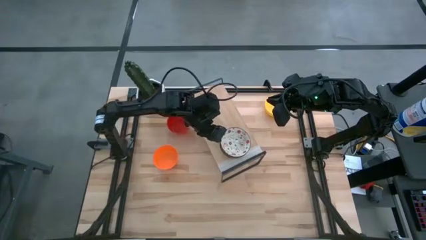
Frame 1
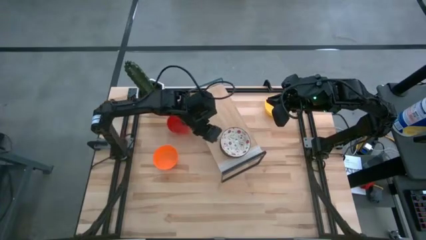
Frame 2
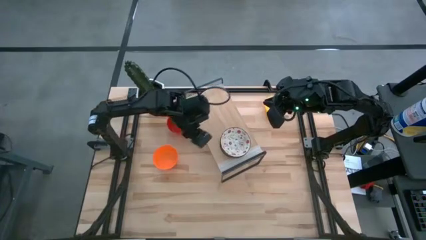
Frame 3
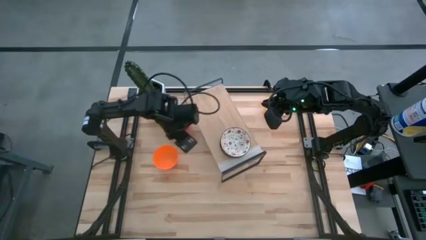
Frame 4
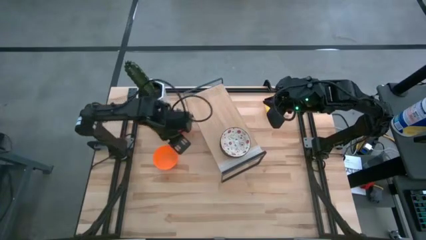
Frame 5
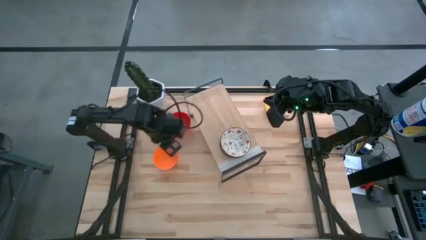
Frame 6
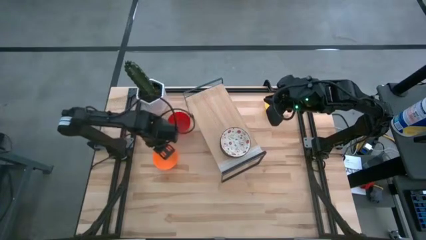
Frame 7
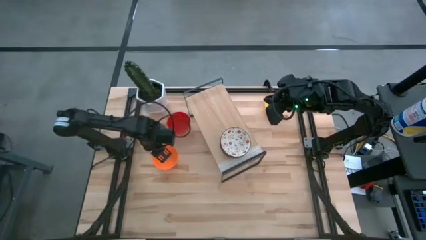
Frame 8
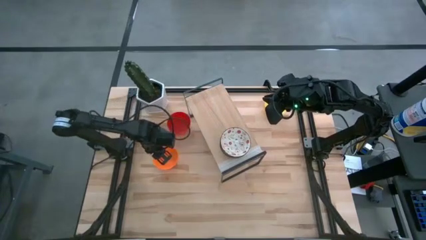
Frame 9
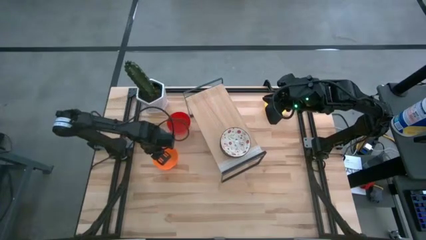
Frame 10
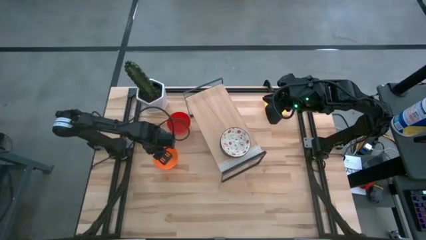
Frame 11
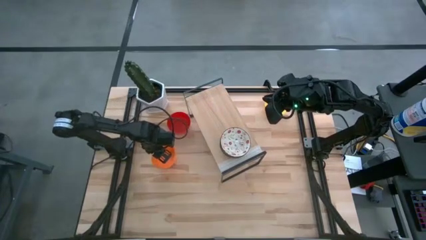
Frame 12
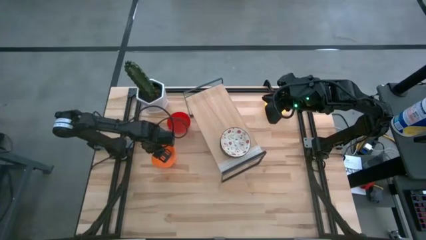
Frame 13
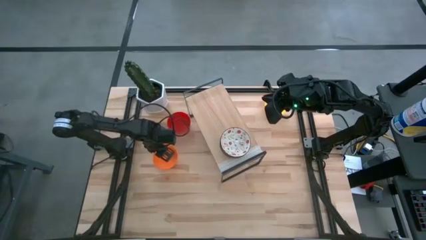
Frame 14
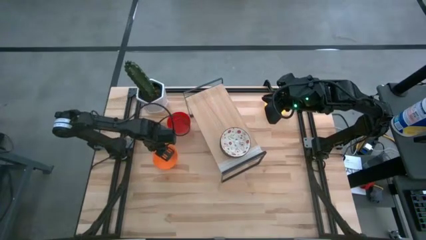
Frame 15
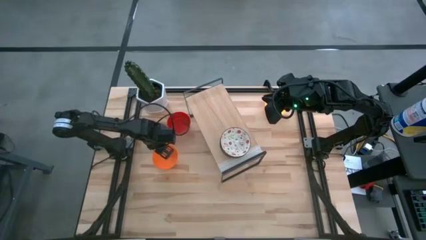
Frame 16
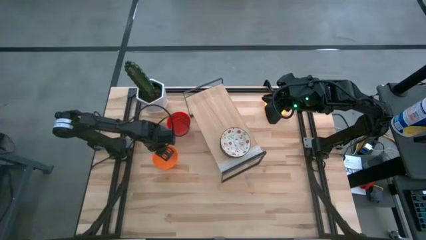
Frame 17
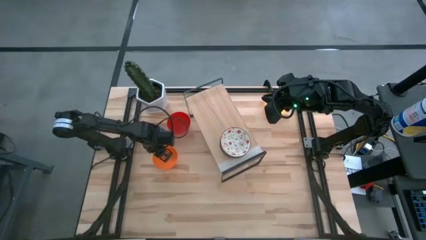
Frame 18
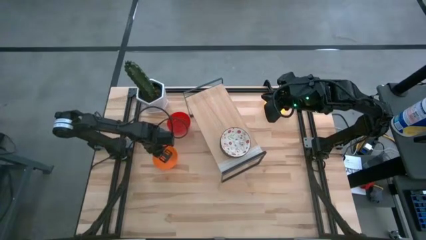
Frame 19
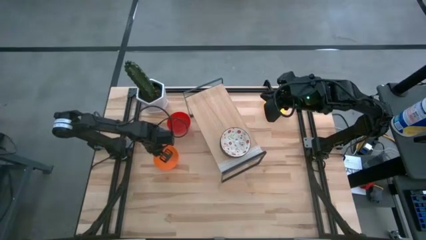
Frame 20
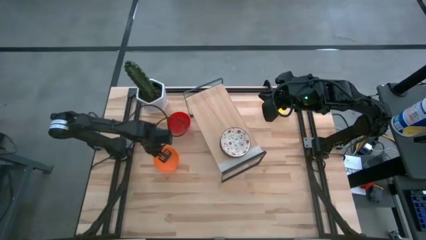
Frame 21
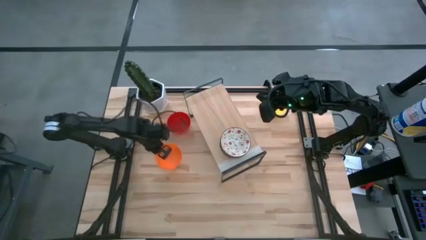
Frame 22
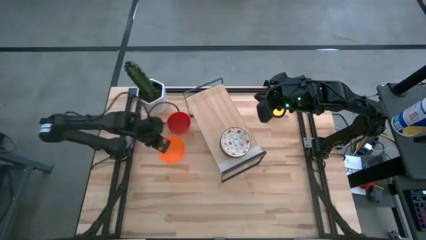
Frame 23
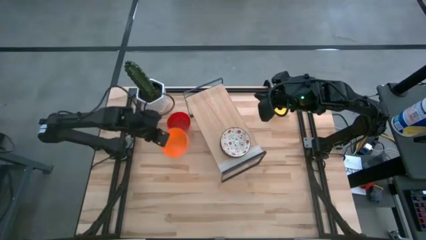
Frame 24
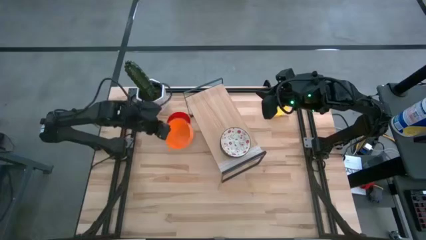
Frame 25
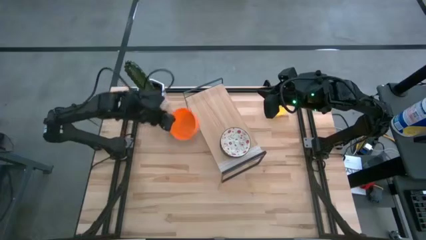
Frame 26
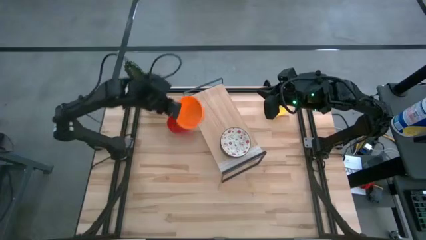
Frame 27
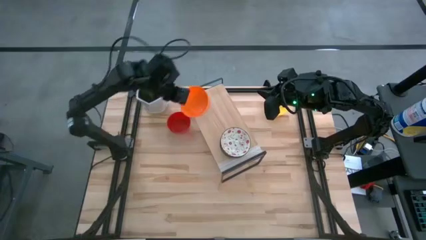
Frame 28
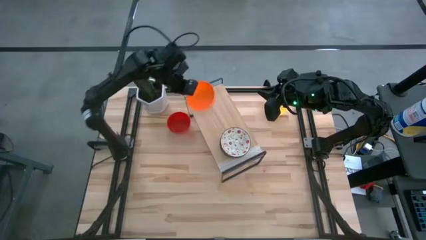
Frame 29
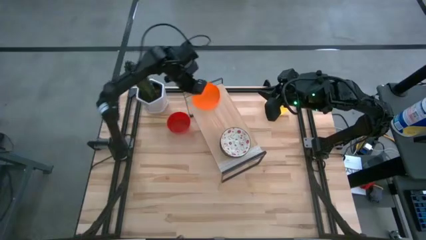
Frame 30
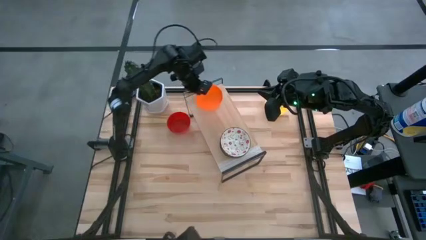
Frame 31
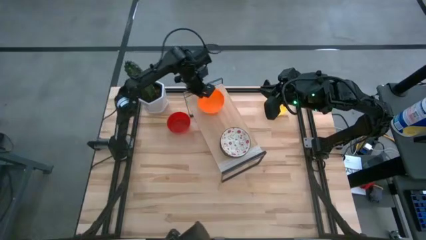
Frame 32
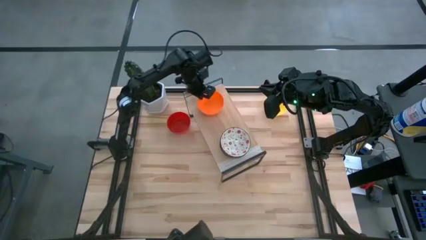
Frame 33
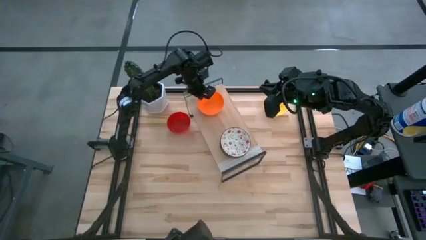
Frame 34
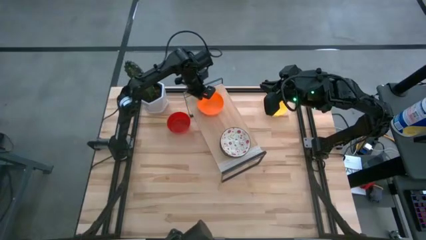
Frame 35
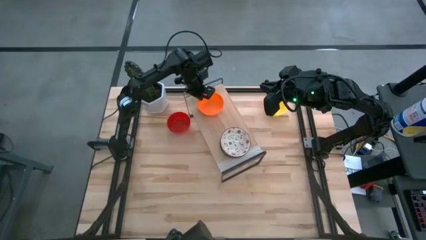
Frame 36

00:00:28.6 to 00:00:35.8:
Task: Pick & Place Mini bowls
Put the orange bin on the shelf

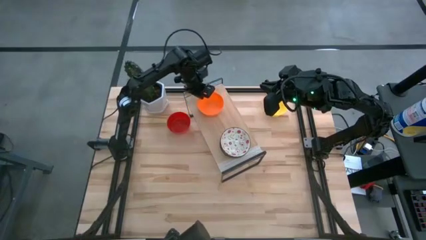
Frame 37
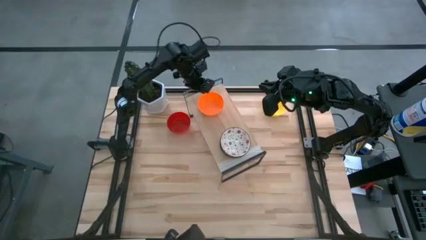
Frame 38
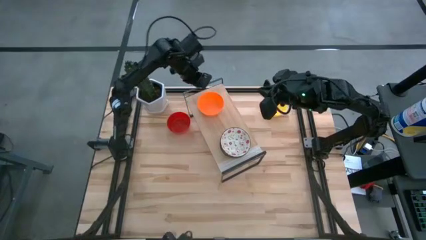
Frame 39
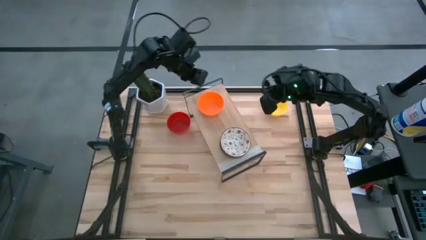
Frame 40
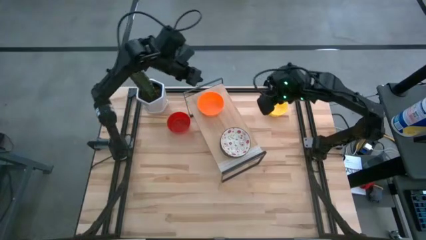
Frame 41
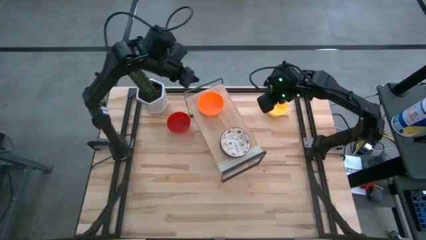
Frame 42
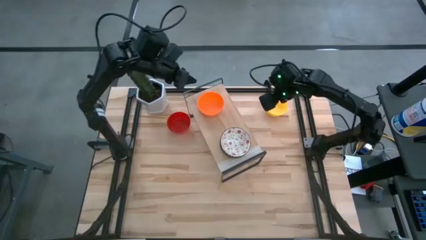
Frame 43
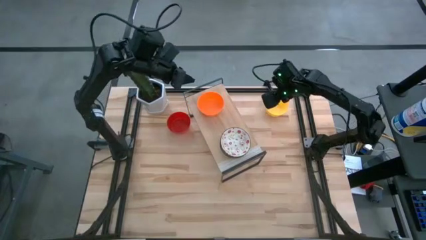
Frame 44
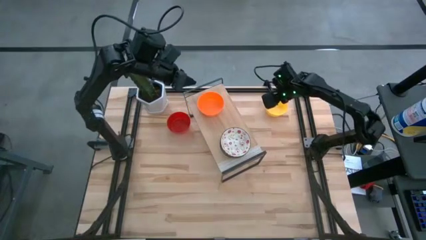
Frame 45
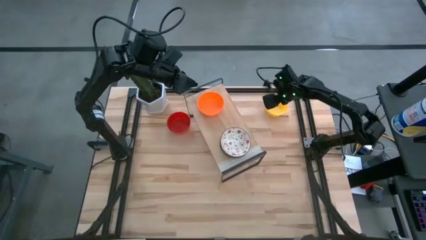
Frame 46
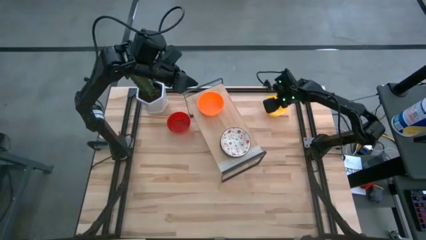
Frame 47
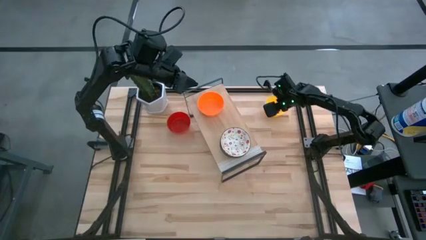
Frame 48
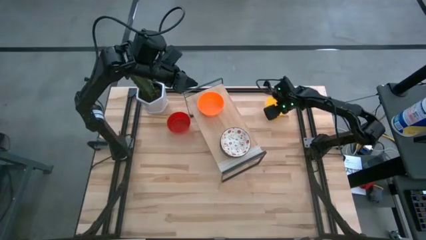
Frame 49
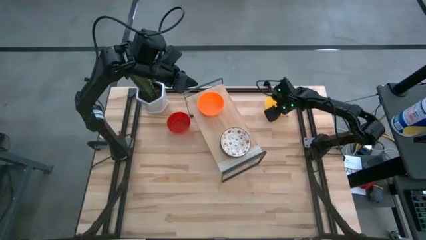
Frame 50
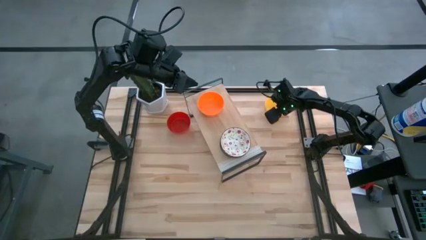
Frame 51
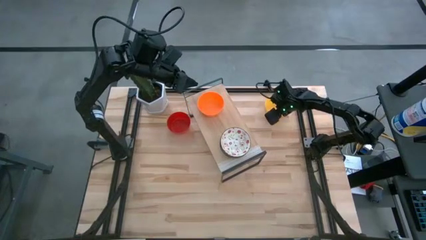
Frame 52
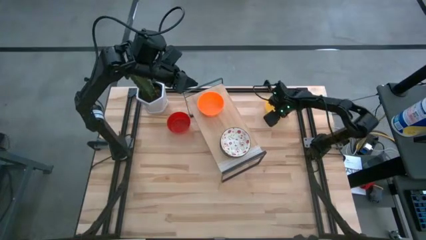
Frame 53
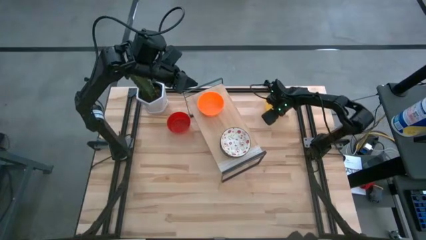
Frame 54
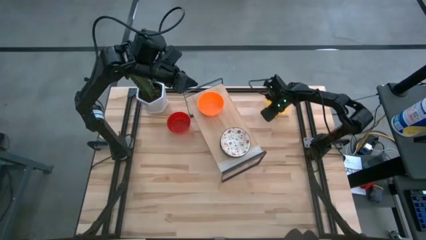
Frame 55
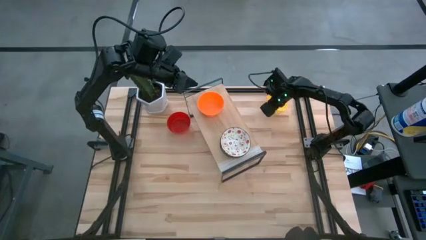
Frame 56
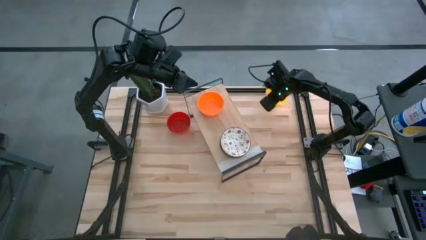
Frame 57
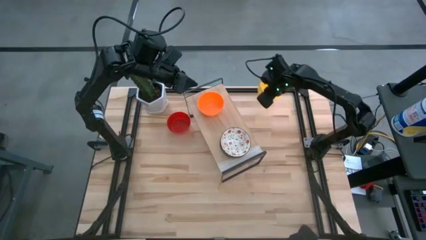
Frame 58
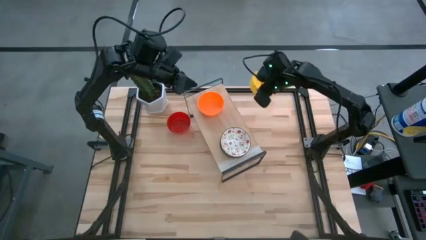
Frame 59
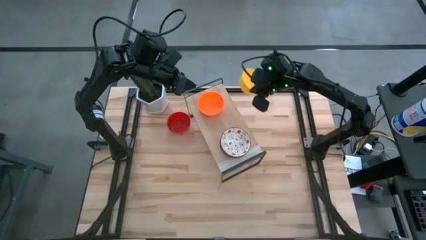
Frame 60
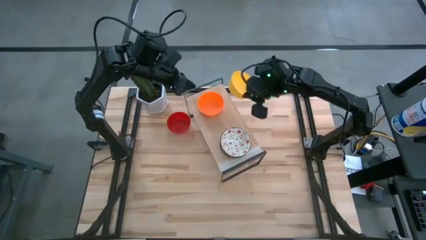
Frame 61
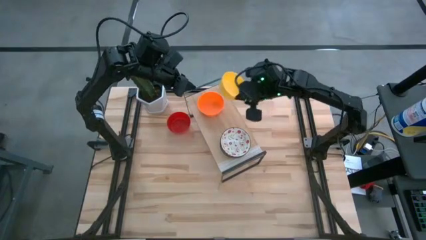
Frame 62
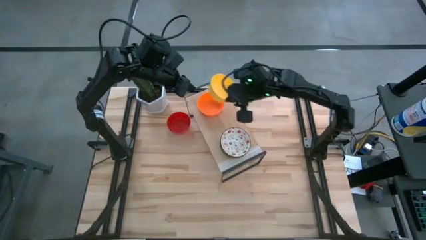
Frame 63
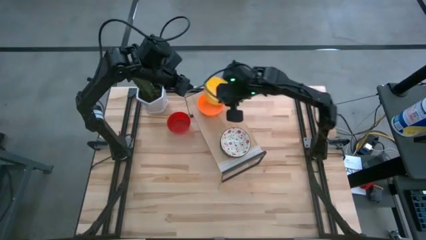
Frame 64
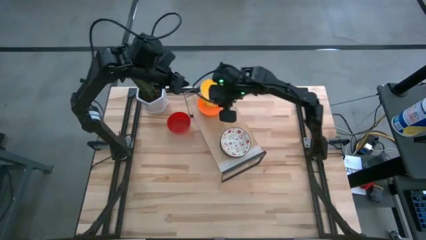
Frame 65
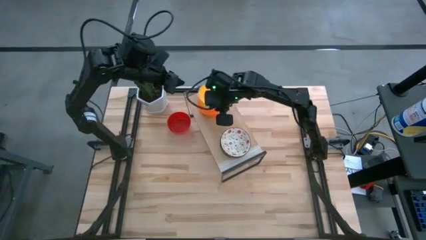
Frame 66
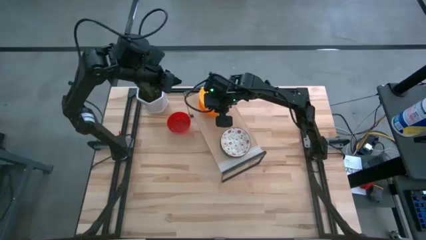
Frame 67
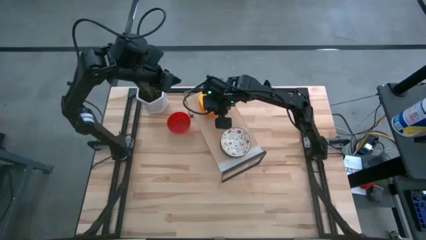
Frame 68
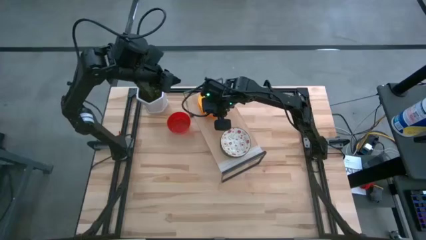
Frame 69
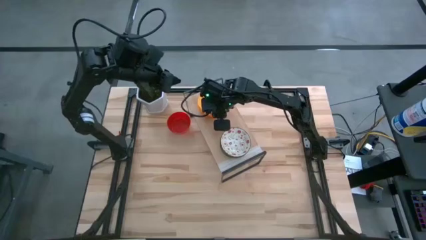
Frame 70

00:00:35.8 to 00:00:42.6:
Stack the yellow bowl on the orange bowl

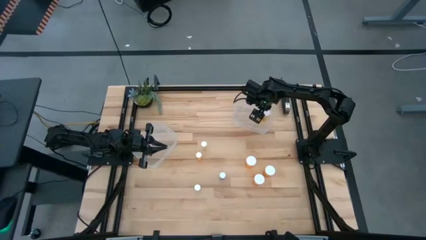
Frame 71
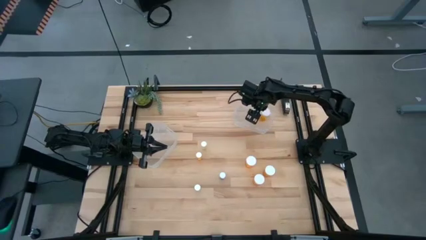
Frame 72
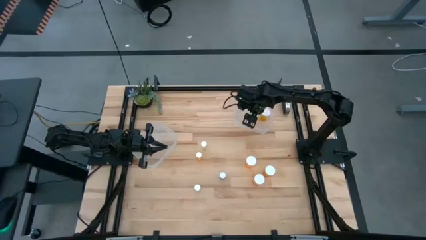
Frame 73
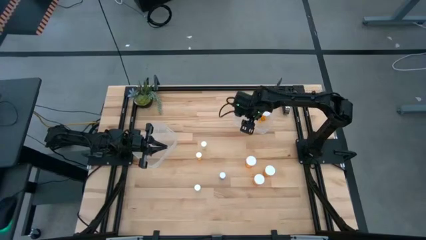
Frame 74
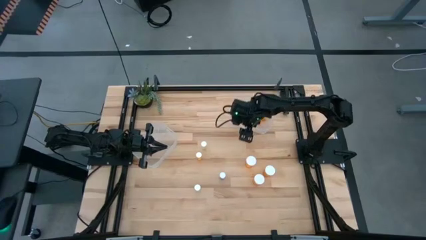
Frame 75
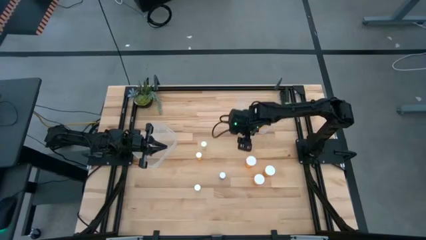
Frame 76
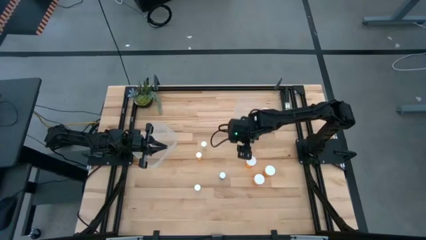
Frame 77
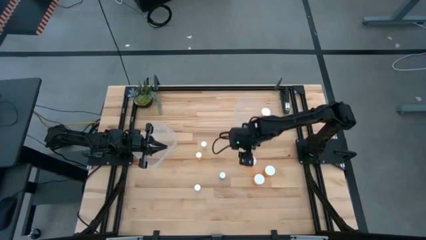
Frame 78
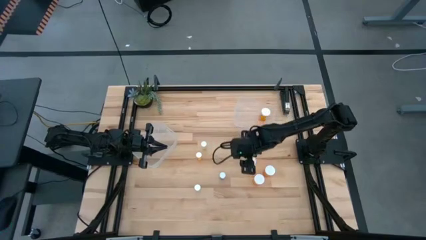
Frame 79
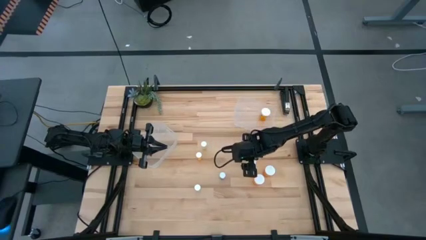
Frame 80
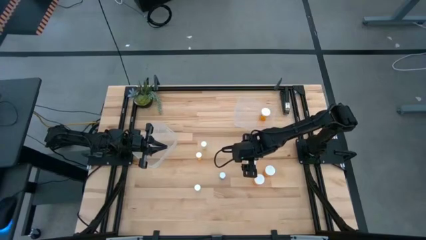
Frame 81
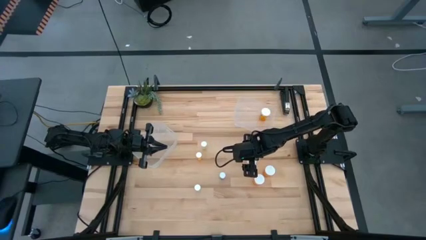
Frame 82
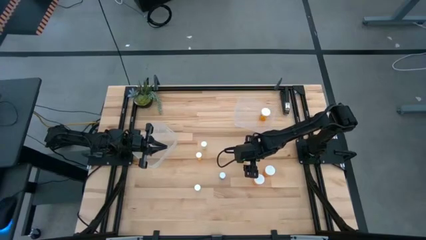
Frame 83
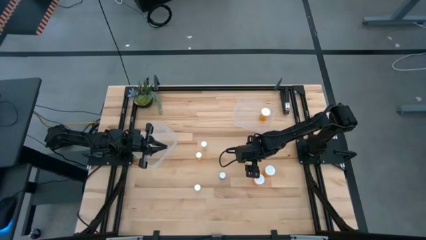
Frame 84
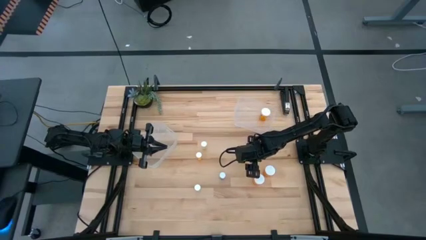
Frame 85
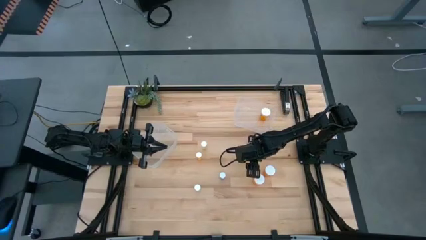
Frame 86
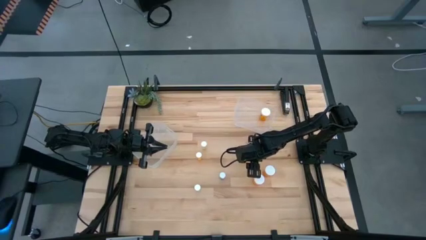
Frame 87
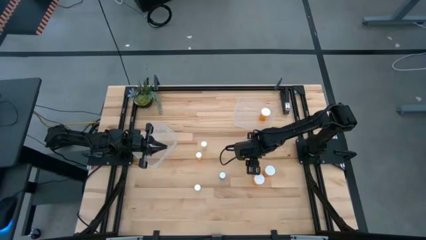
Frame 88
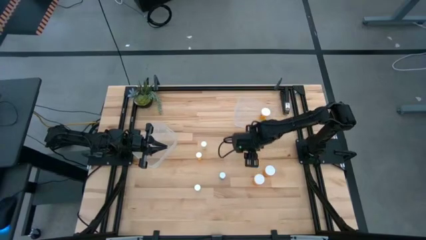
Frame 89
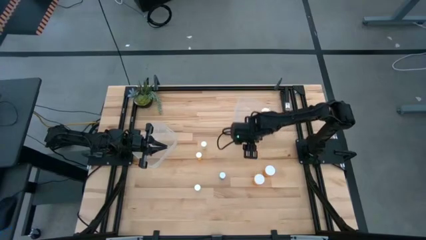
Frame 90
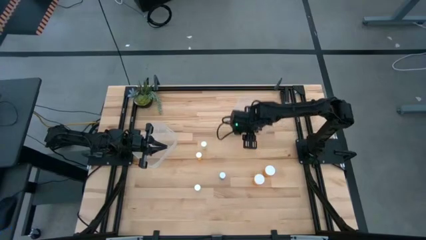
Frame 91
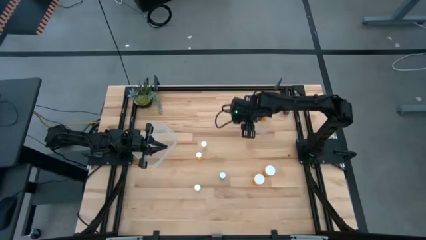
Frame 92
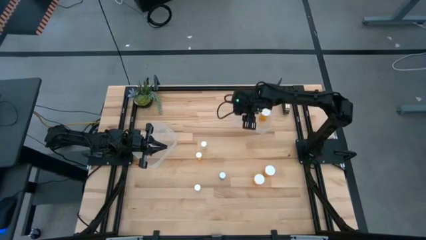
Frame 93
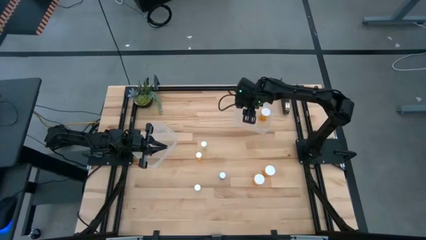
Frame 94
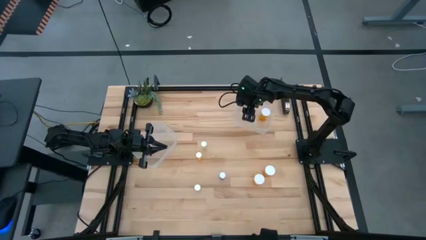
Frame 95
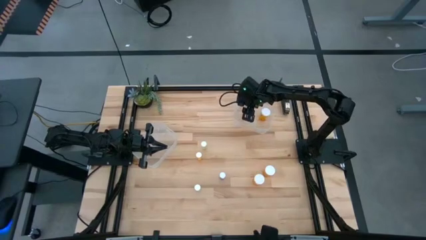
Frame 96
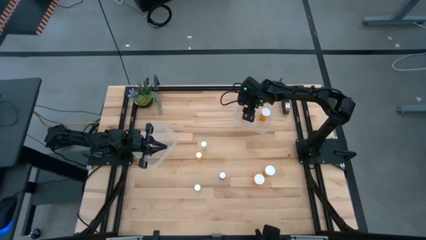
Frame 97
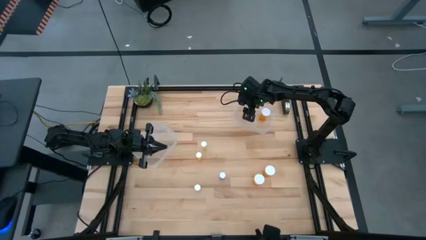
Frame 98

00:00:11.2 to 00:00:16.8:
Task: Pick and place medicine bottles into bin by pill shape (circle, oval)
Put the big orange pill bottle into the right transparent bin
